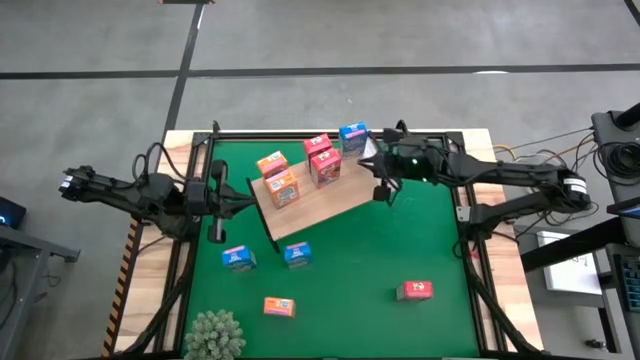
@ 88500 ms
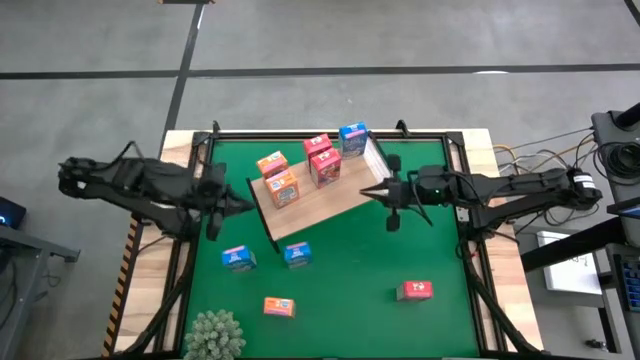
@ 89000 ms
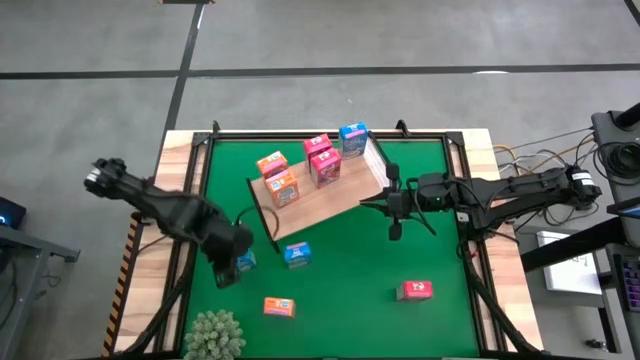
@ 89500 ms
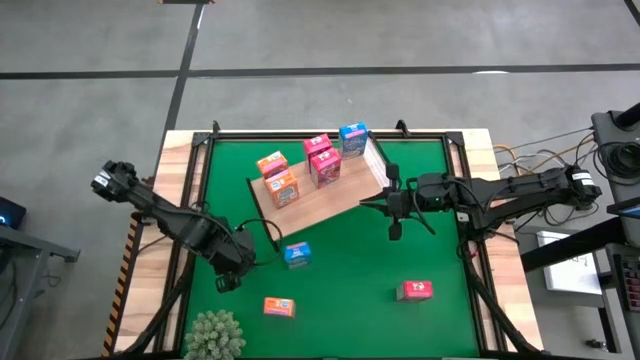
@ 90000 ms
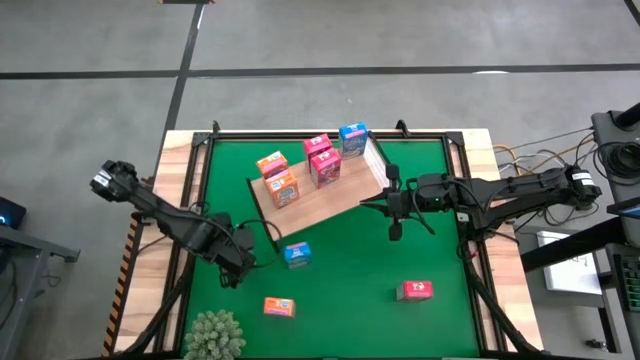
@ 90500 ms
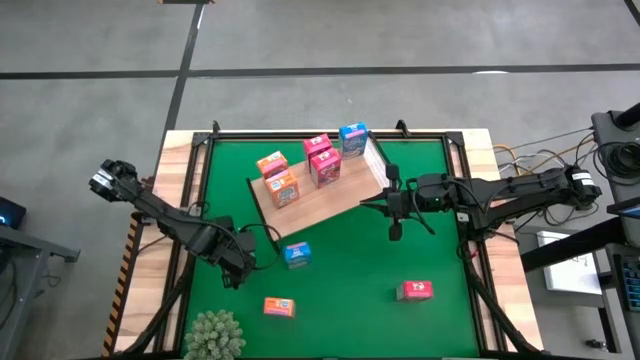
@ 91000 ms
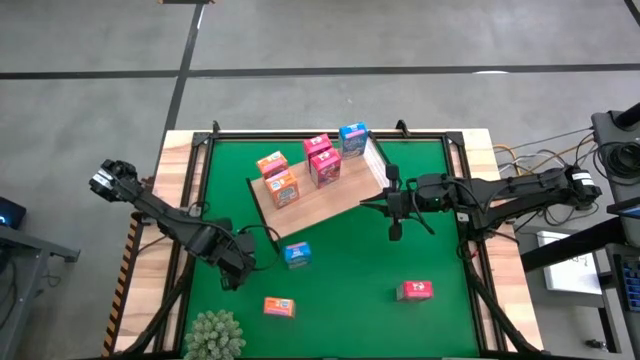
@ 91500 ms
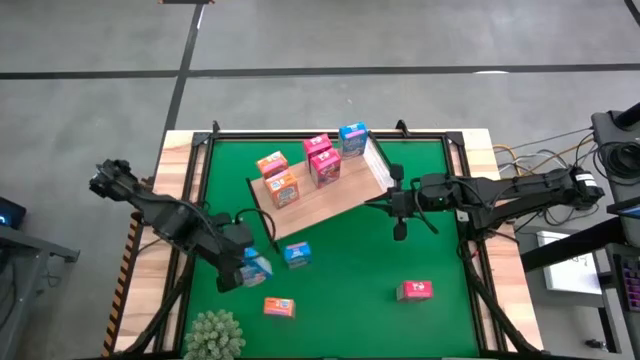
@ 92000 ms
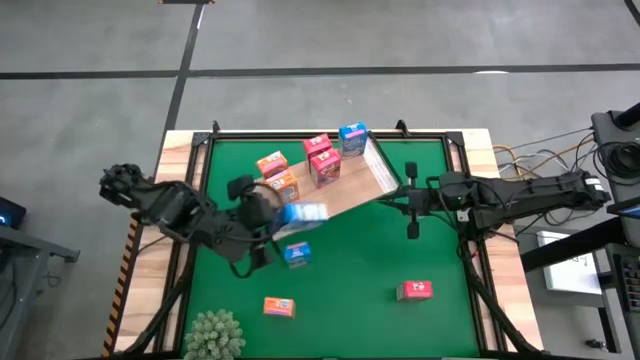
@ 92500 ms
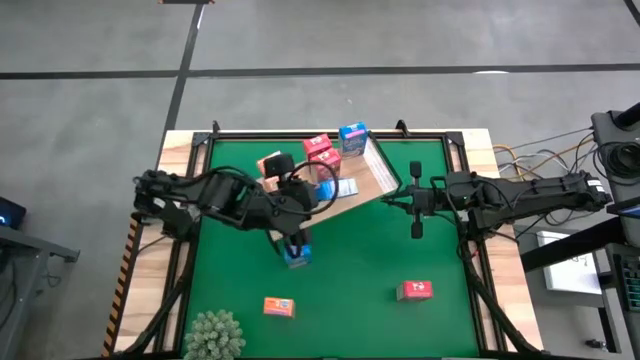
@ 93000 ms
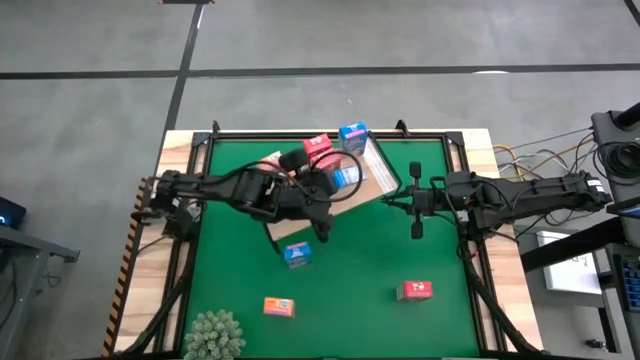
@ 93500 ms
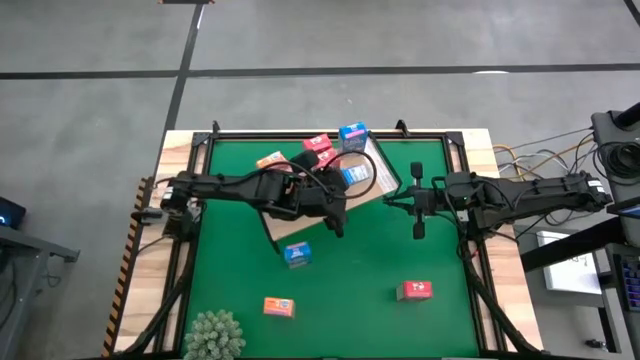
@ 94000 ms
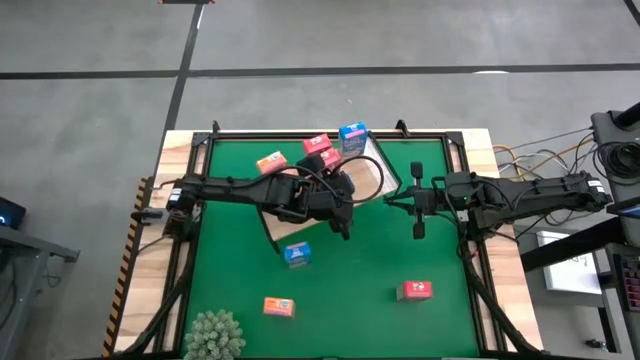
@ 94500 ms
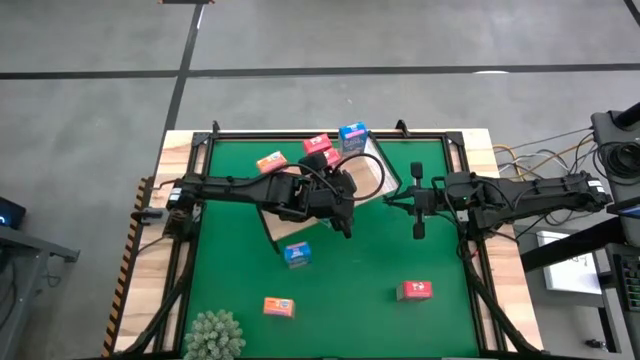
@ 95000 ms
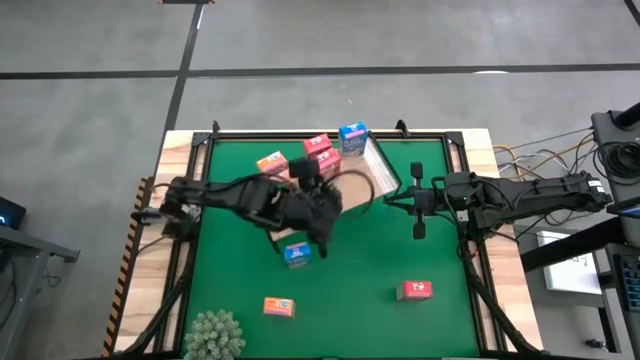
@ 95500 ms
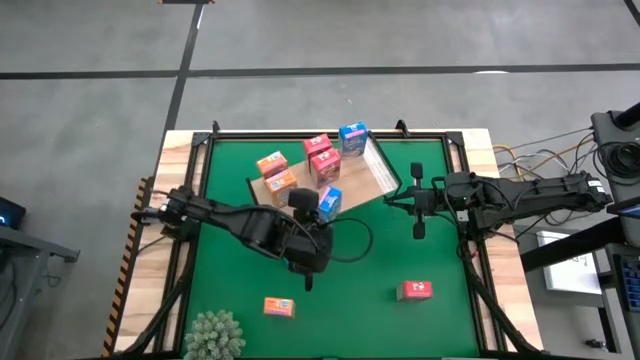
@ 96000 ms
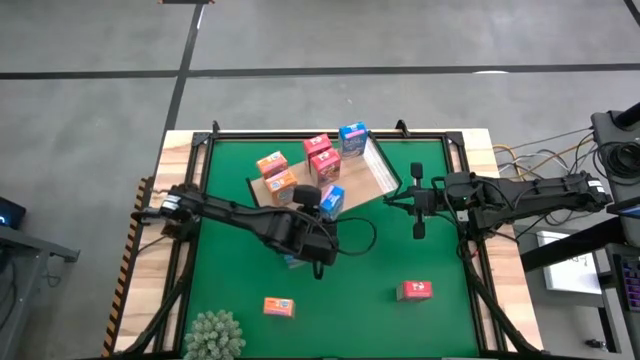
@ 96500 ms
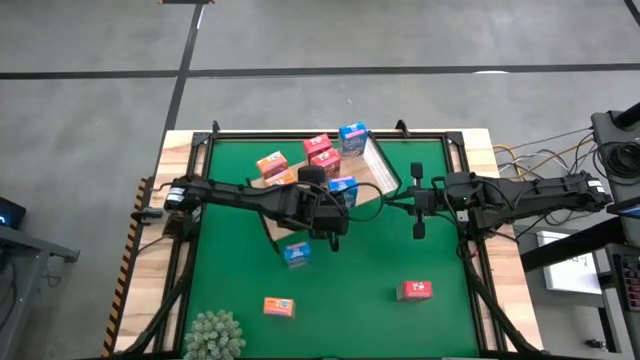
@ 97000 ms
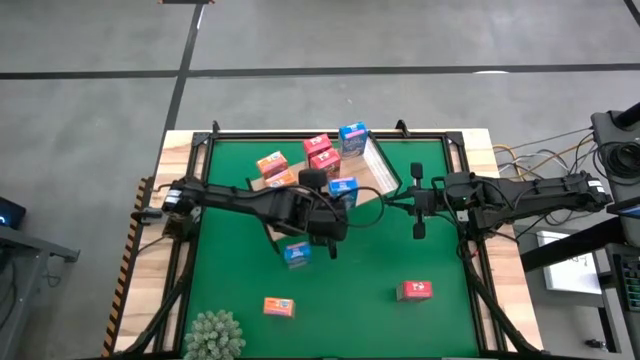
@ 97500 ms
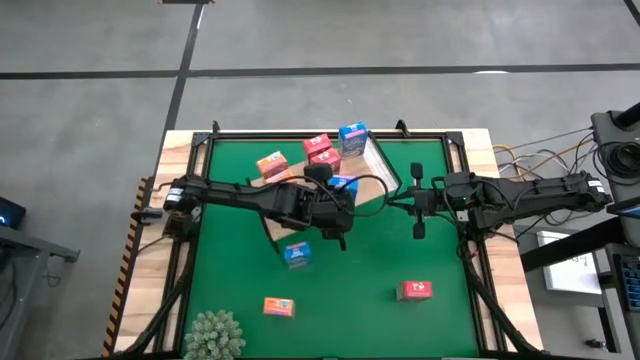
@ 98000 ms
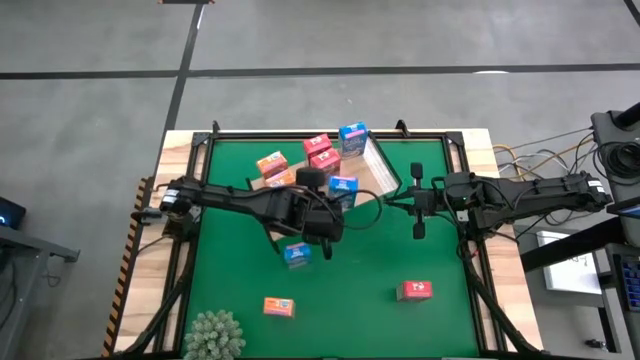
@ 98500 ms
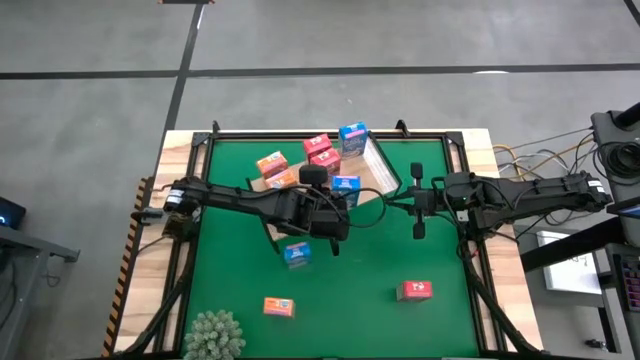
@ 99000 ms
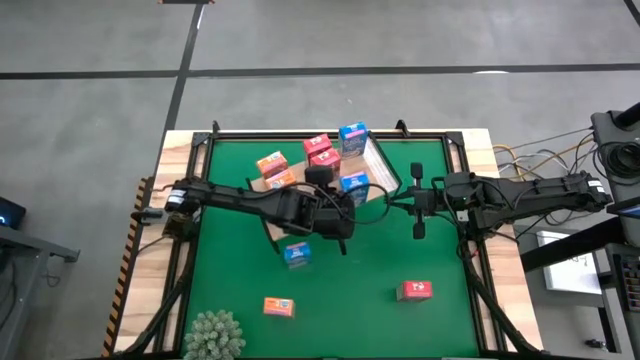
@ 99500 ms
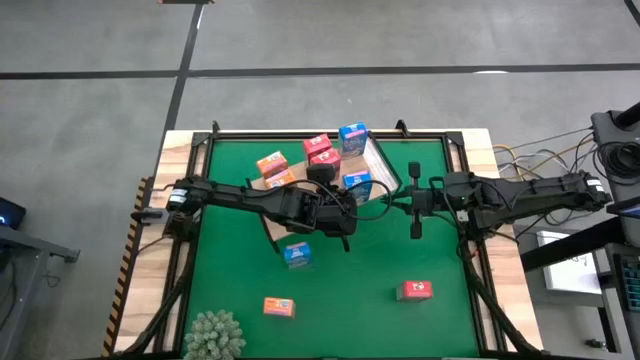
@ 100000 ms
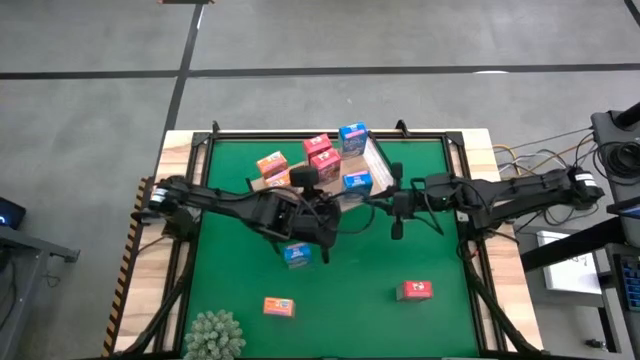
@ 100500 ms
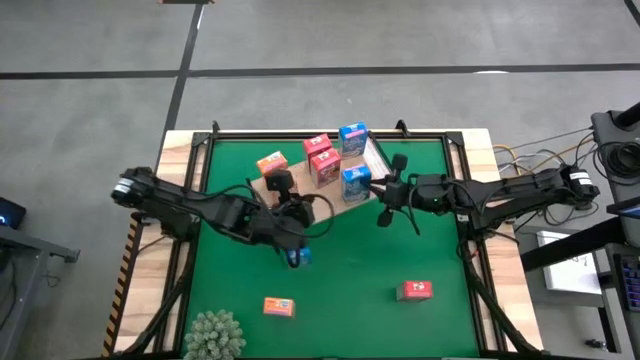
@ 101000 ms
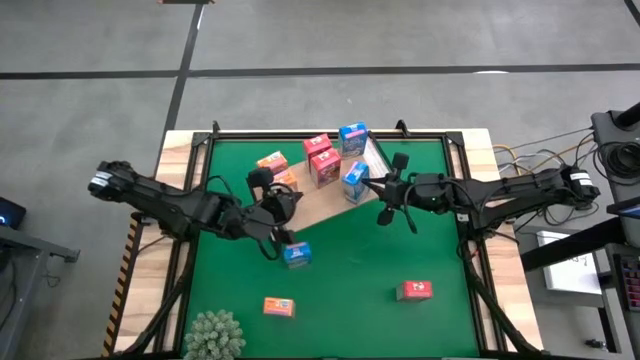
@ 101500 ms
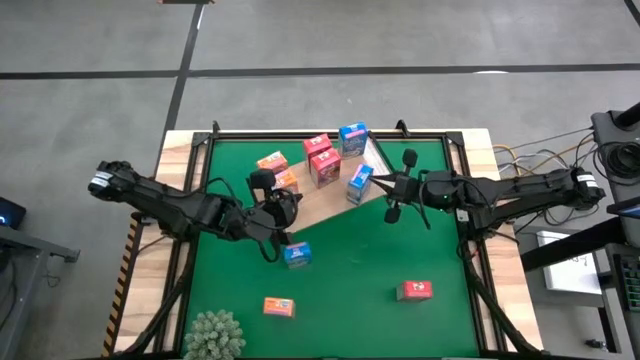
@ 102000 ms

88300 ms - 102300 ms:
Task: Stack cereal on shelf
Put the left blue cereal box on the shelf aligned with the other blue cereal box

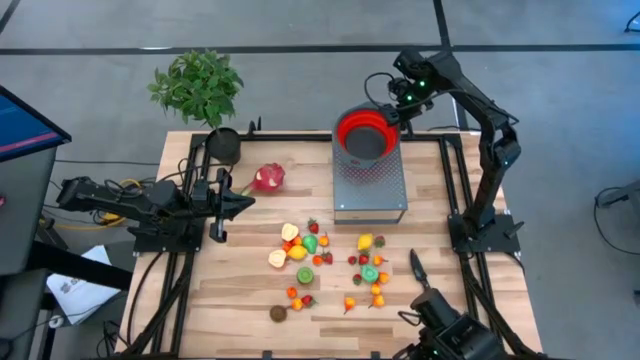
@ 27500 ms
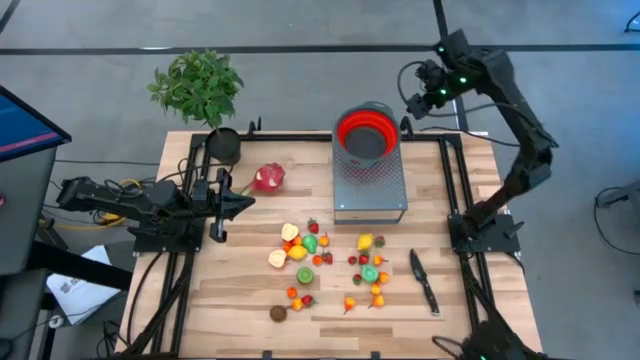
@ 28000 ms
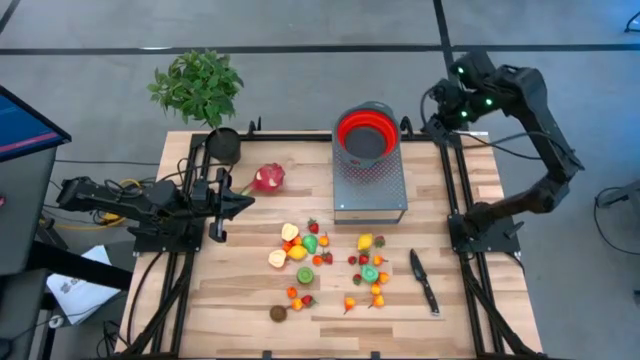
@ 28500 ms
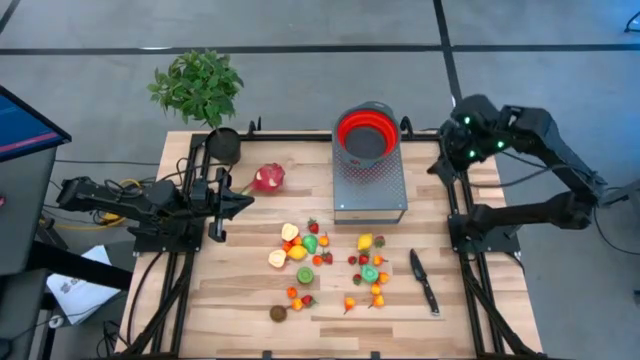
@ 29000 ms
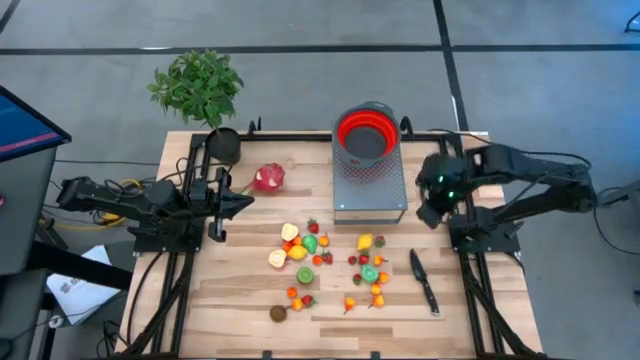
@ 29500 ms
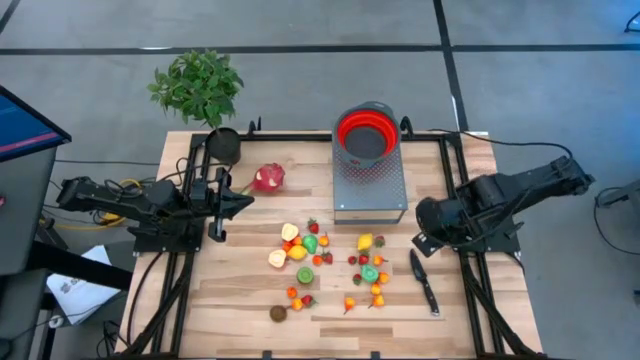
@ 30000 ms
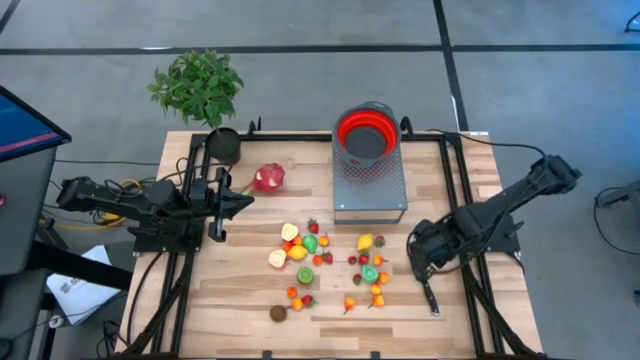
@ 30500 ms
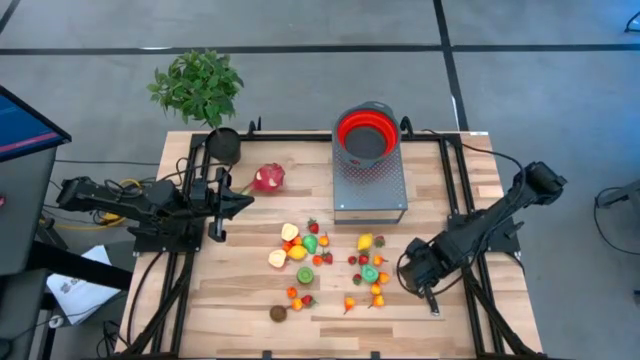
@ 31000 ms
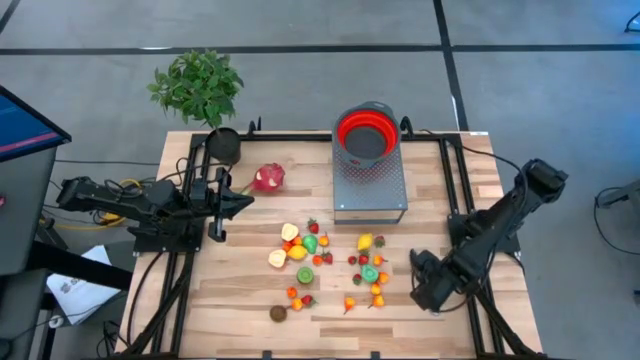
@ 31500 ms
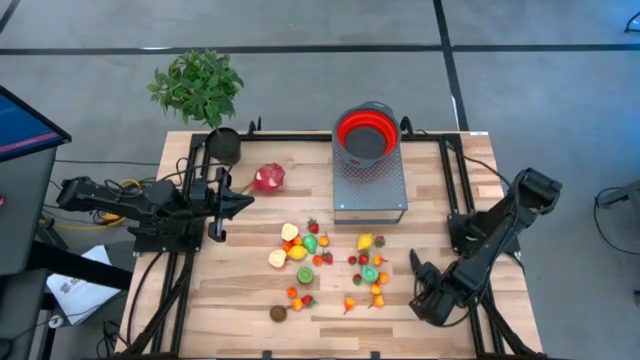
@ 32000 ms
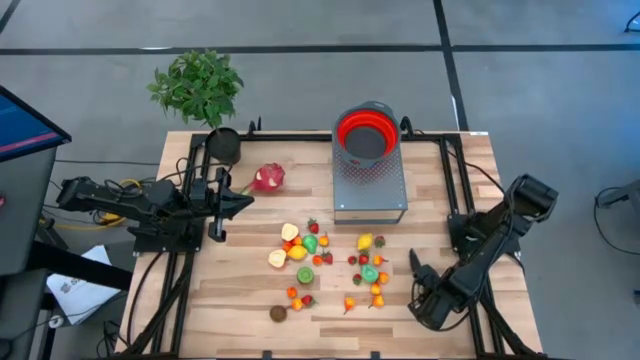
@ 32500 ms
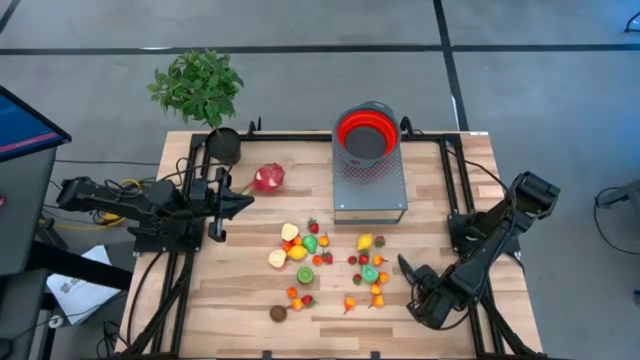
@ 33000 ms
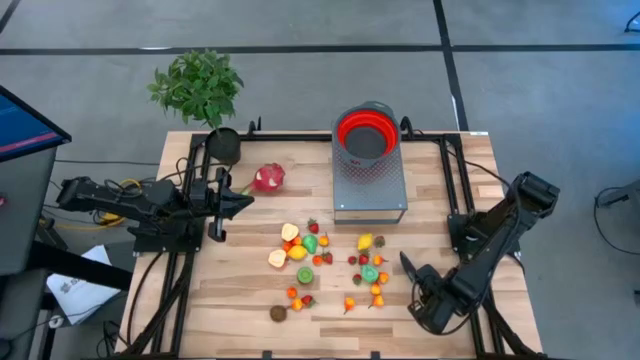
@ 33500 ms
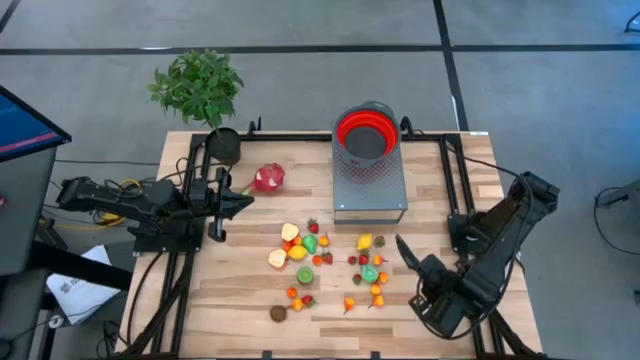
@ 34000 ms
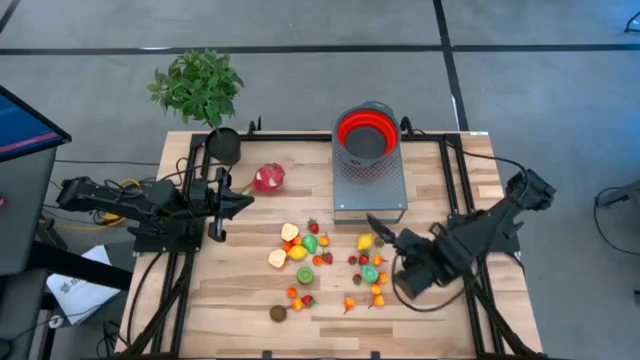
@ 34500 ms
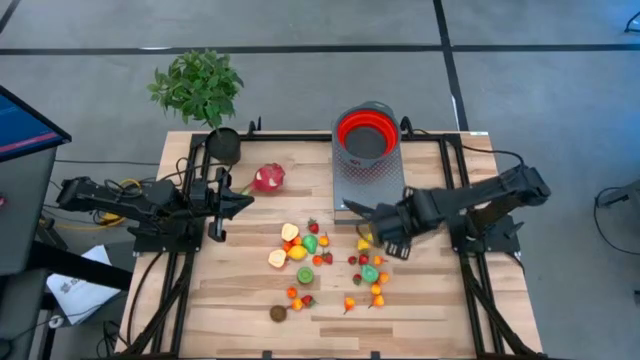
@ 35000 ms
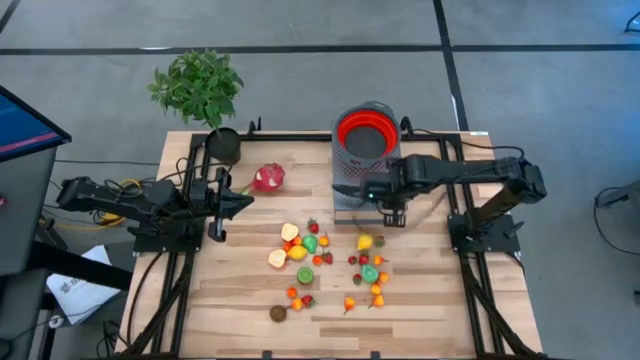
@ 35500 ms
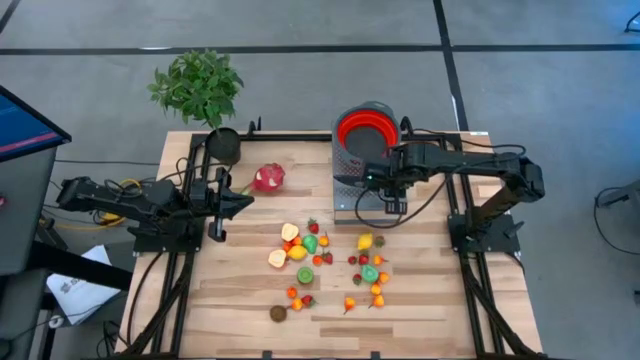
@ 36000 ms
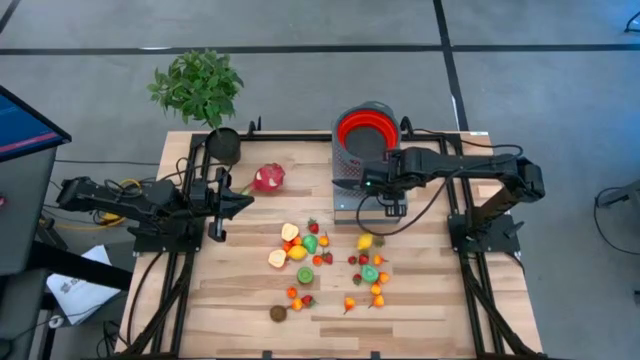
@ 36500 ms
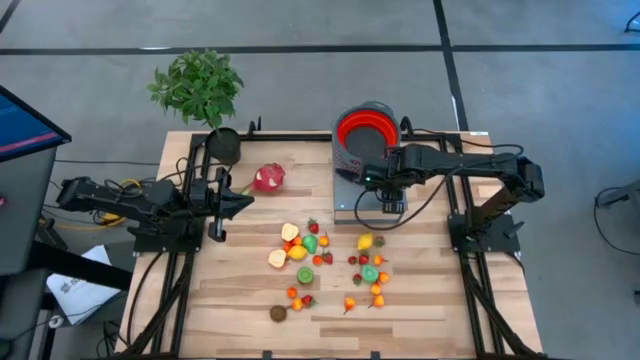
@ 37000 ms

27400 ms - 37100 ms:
Task: Pick & Place Fruit
Put the black knife on the shelf
